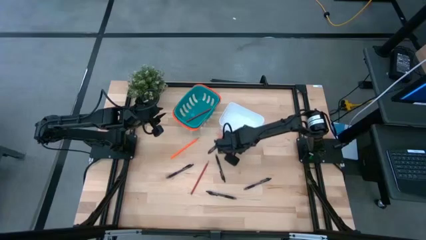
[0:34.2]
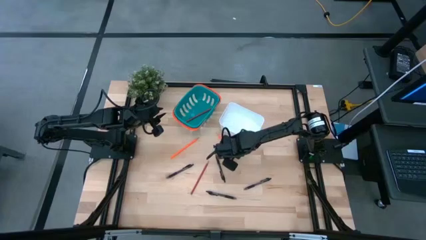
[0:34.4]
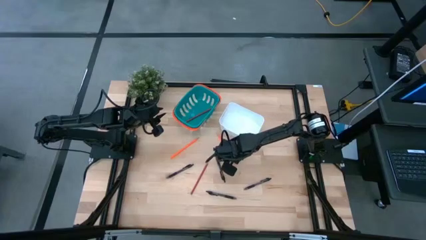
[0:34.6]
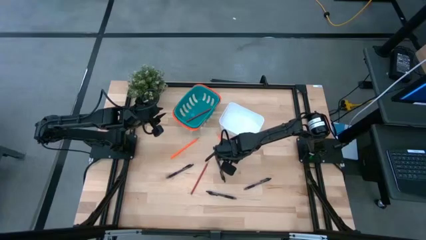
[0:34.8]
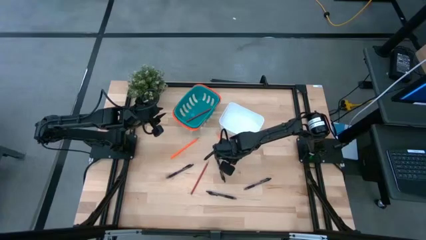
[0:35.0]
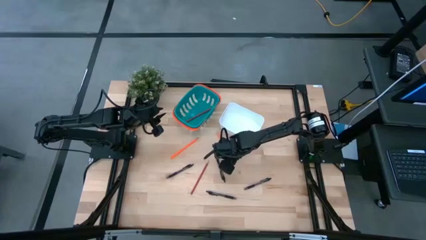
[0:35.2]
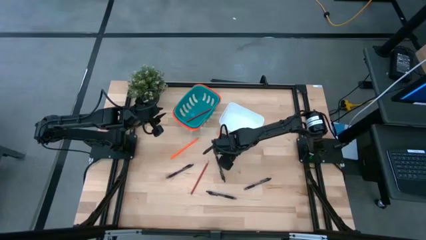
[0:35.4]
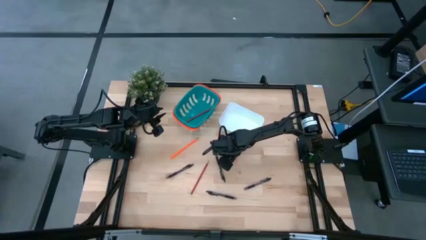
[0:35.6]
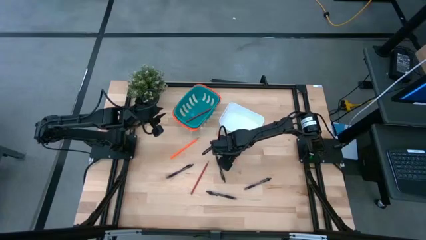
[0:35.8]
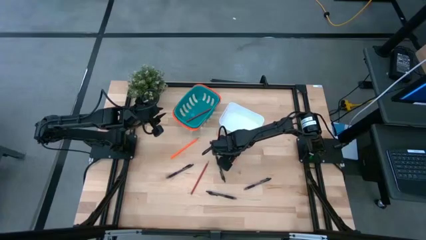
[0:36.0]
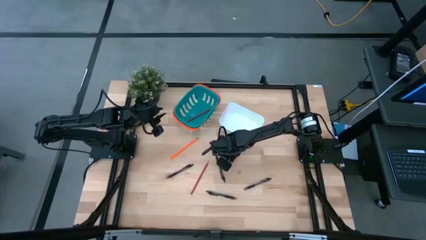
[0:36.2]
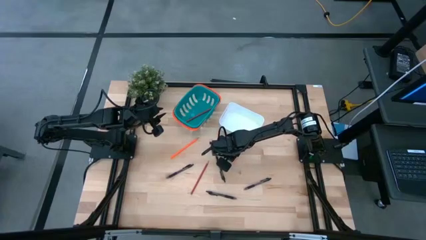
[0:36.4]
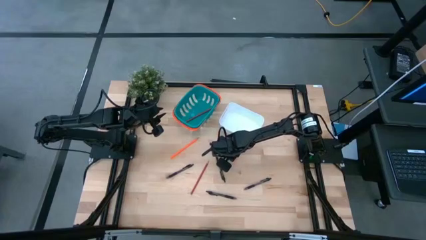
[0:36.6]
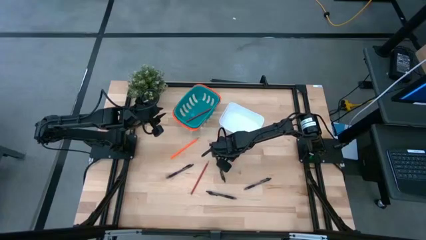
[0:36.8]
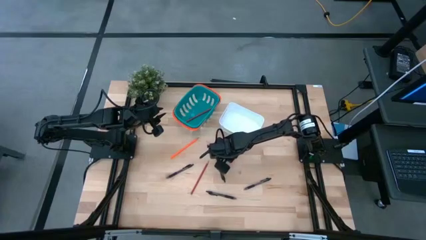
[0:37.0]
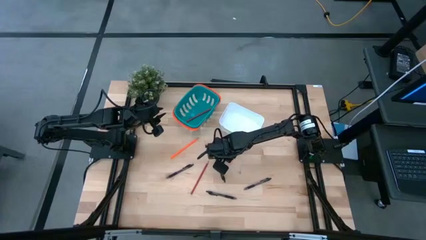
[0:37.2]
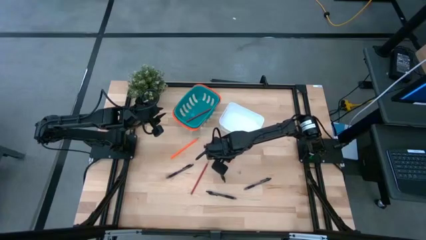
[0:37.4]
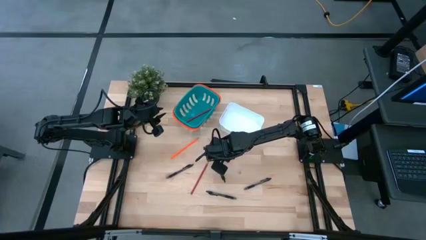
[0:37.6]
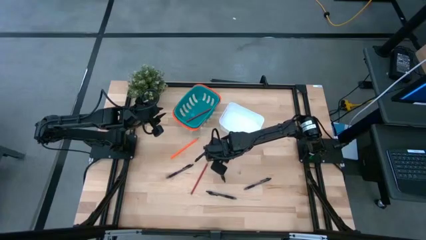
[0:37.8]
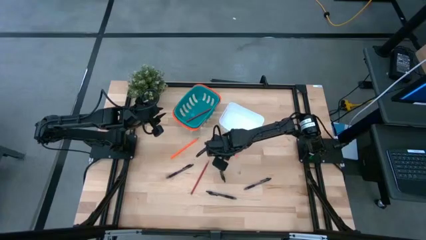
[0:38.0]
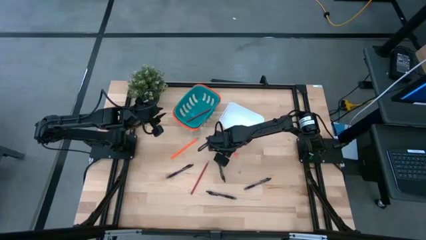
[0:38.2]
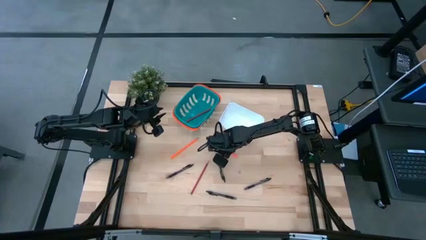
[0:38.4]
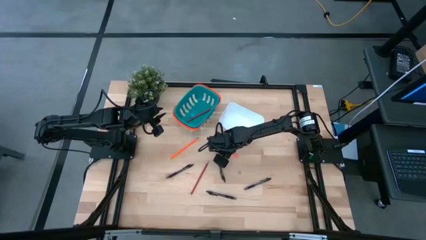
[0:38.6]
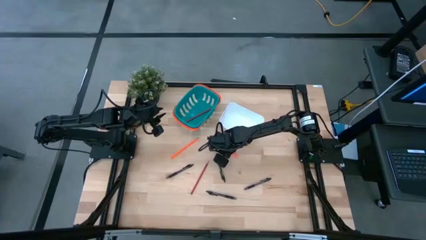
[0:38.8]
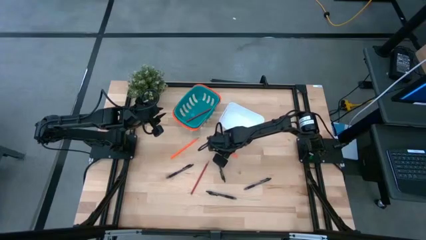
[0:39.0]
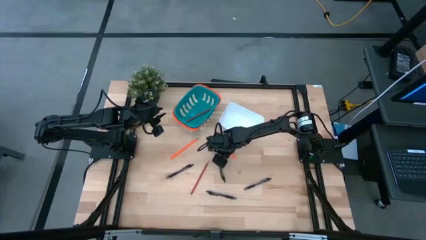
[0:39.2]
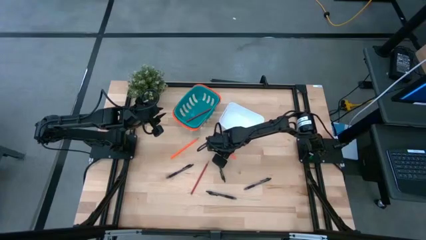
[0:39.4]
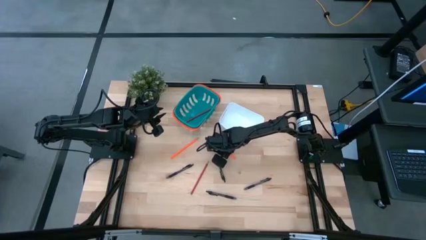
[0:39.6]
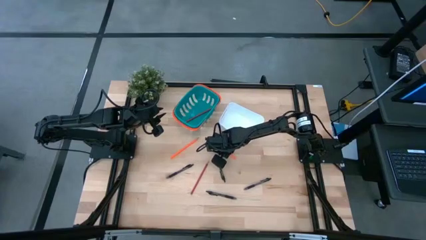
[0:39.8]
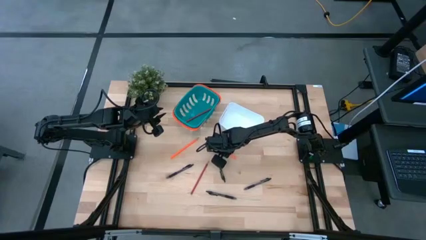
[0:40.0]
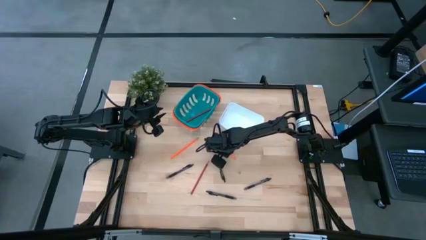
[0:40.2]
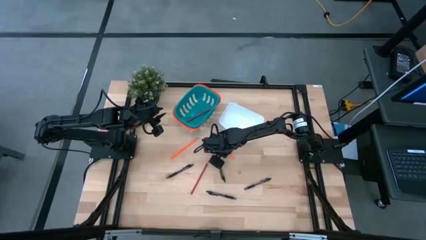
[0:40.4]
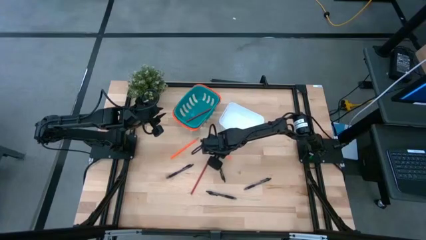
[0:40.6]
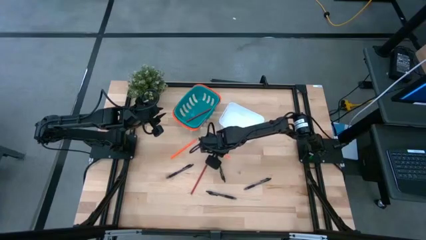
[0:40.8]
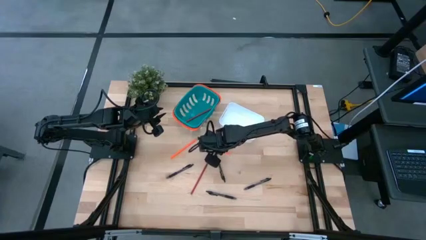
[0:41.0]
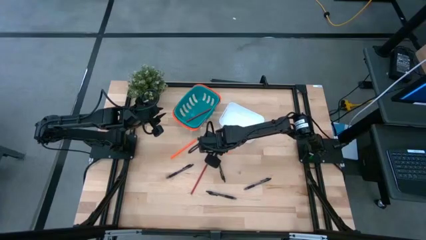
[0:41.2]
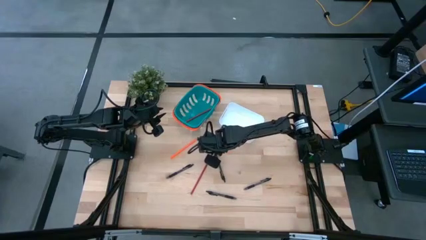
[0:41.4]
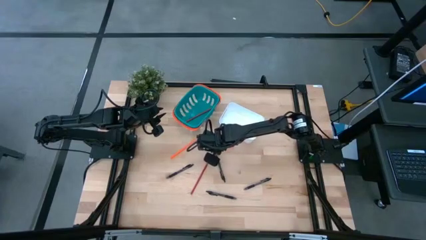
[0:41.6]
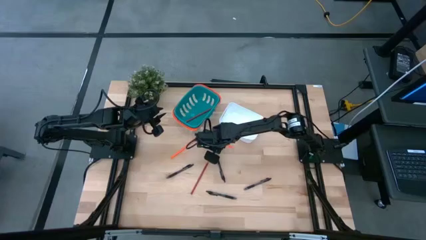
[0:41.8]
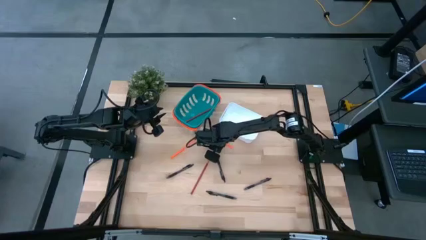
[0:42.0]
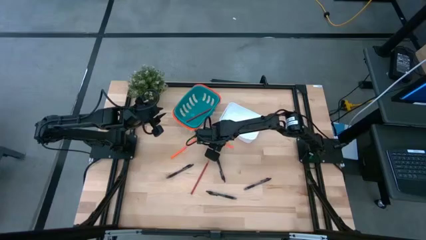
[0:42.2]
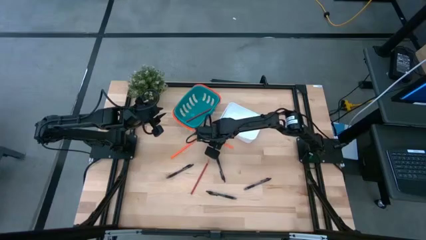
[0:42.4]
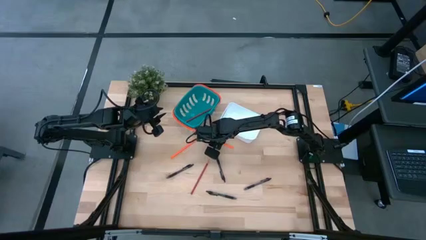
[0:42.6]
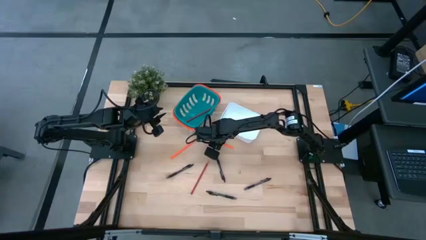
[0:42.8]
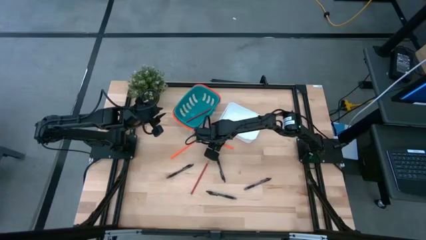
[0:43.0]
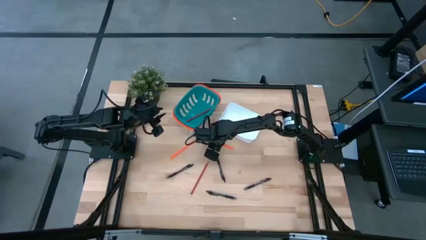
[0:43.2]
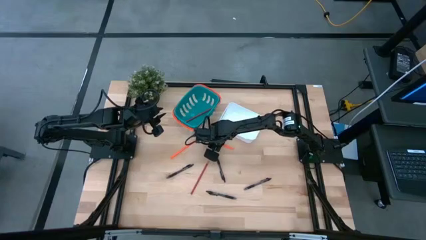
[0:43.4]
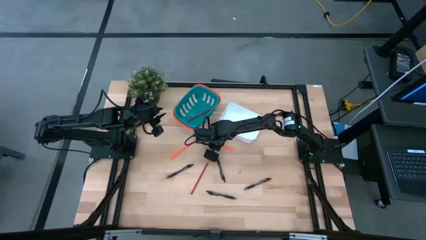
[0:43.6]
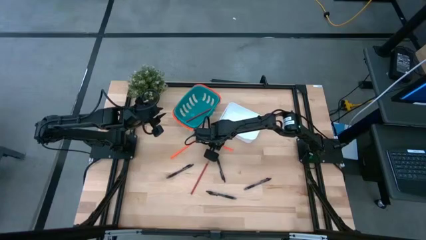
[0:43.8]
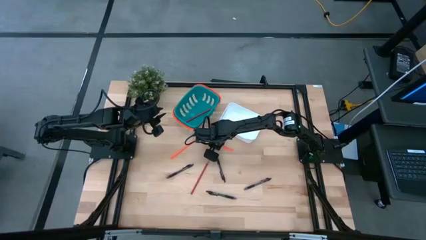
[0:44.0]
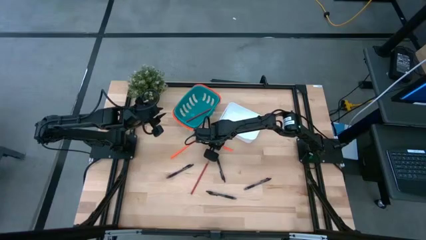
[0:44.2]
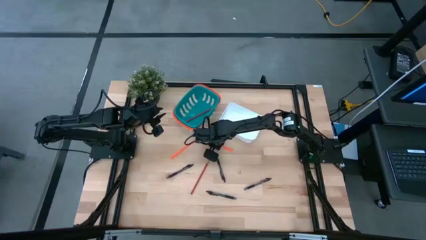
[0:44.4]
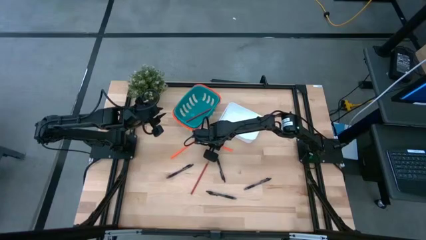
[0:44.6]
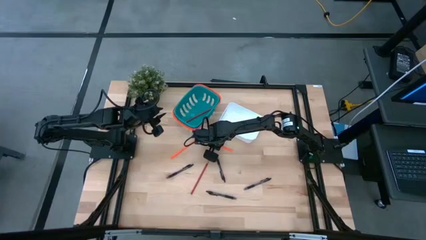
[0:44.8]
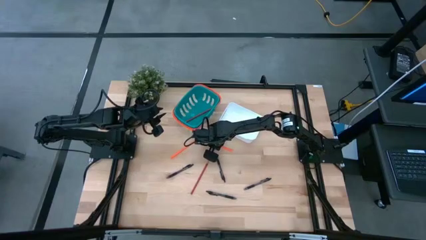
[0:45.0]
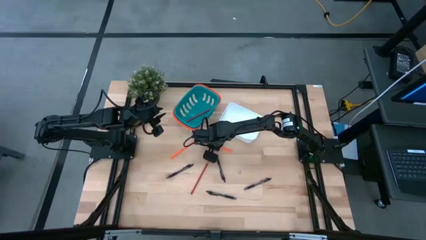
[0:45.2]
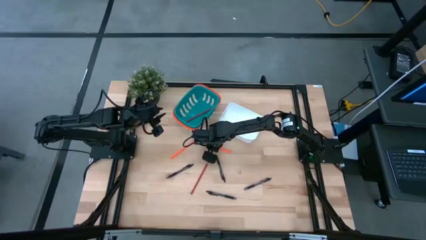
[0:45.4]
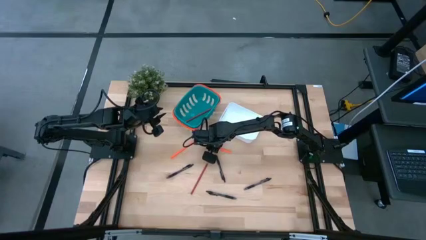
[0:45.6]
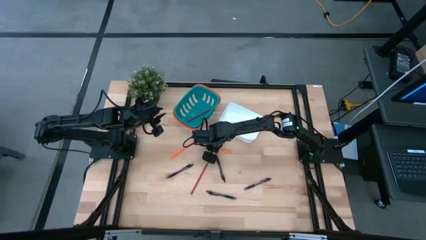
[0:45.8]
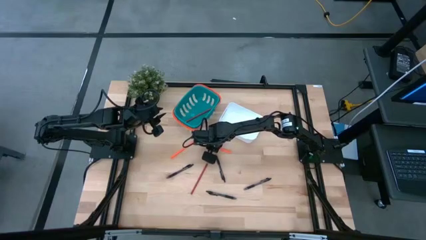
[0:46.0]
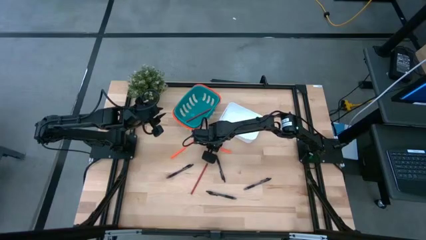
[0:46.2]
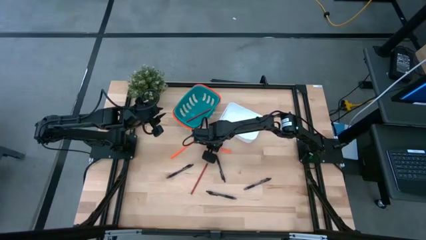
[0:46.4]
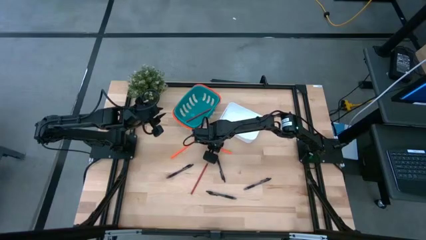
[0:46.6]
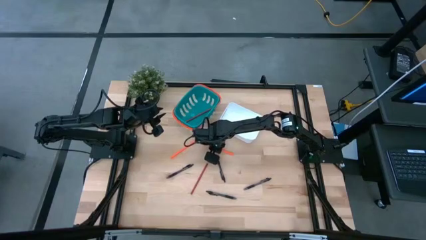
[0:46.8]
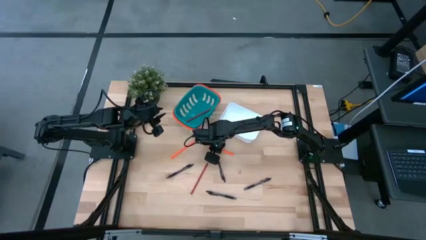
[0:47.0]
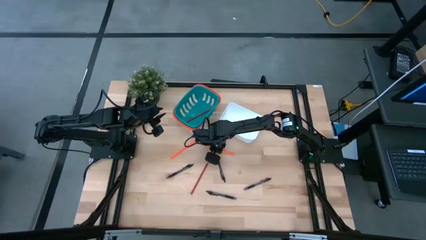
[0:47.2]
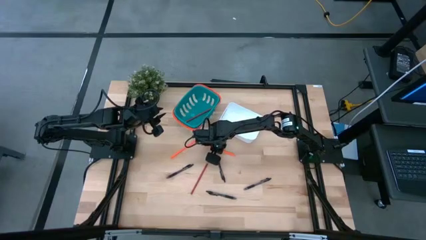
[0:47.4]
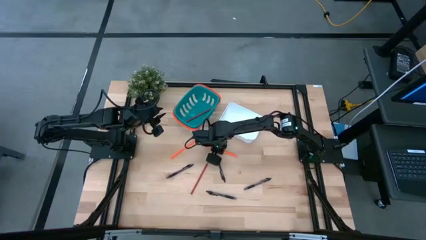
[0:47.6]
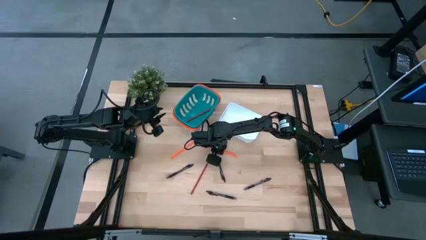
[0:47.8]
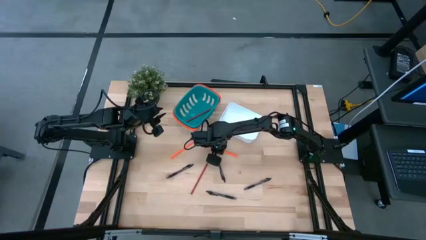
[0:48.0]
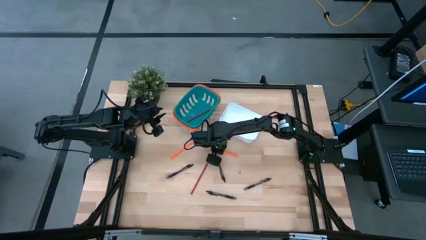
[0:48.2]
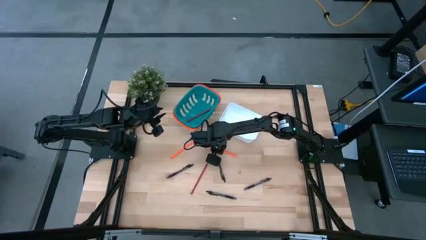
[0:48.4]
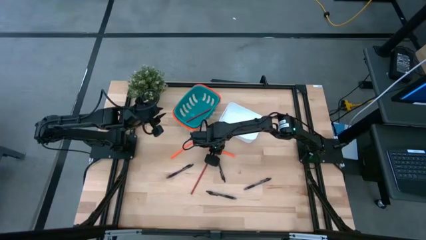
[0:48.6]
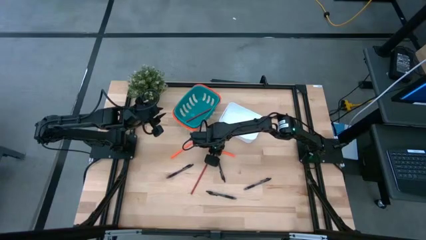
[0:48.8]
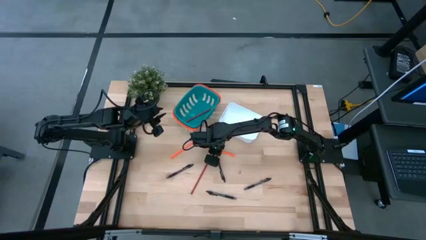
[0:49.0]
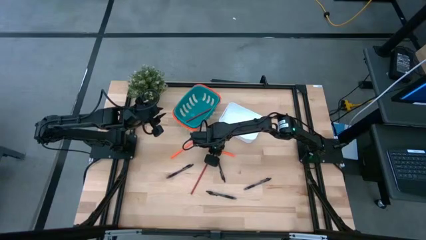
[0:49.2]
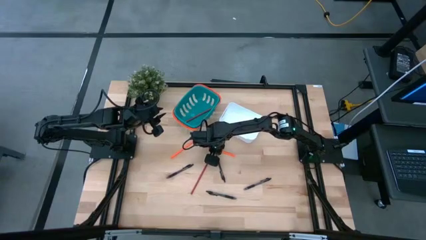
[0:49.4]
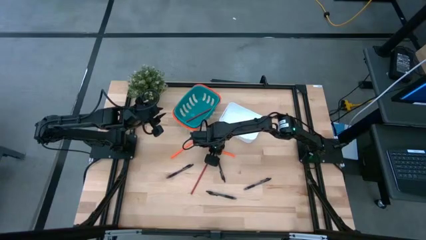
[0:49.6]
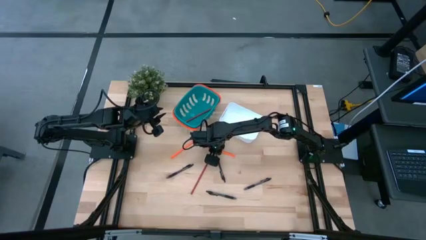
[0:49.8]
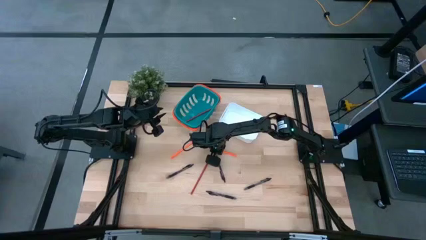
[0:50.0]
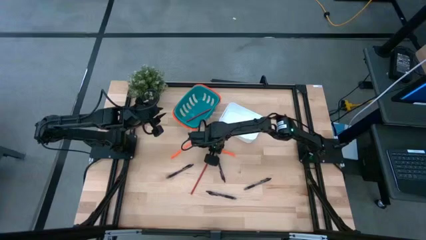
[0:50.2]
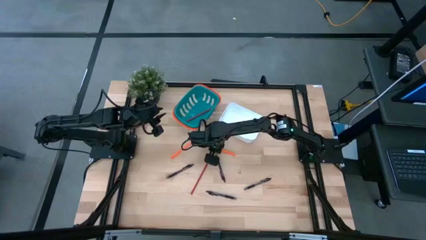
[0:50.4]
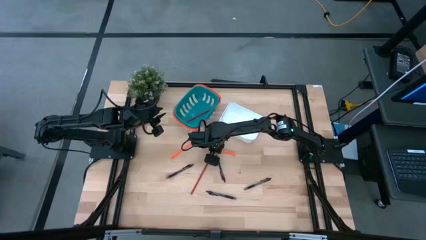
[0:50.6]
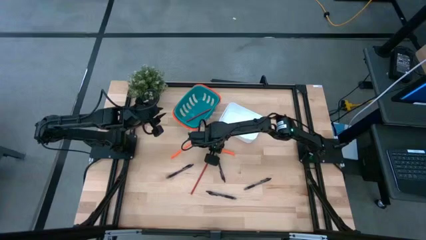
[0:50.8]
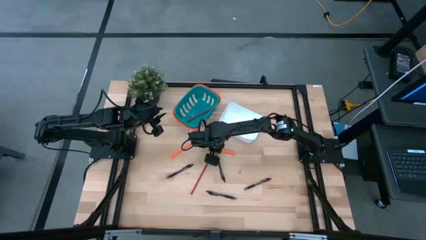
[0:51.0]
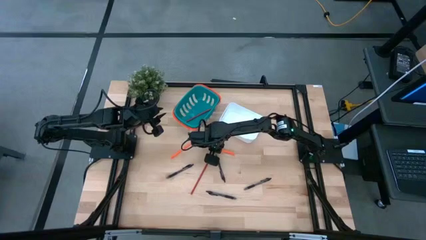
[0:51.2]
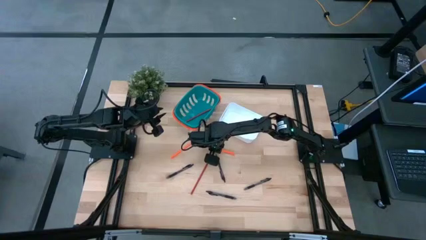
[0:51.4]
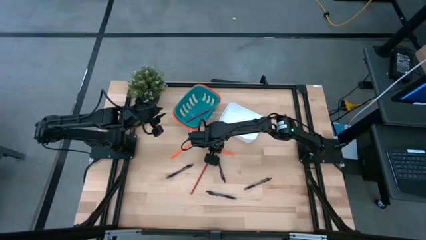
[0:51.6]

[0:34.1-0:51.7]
Task: Sort pens & pencils
Put the right orange pencil into the blue bin
